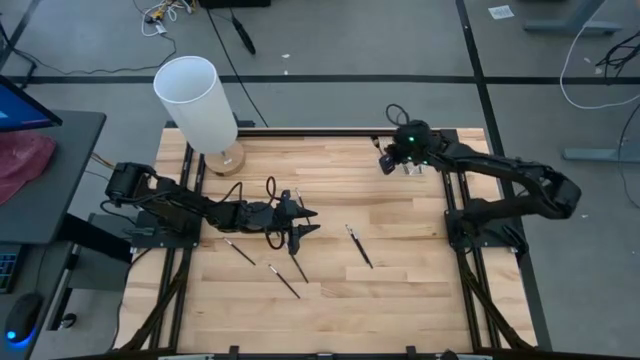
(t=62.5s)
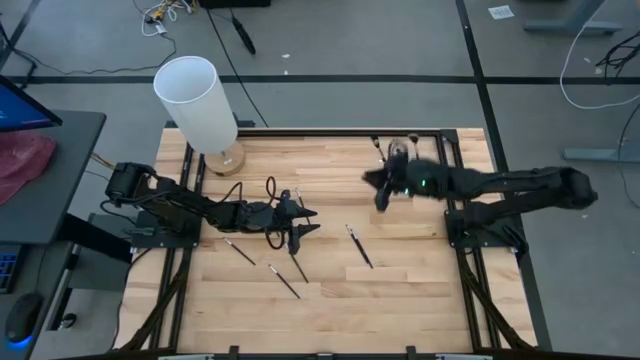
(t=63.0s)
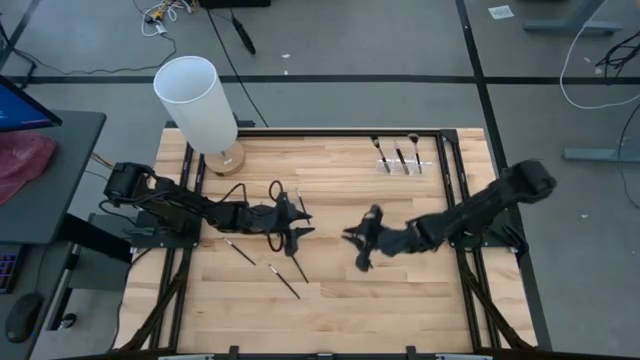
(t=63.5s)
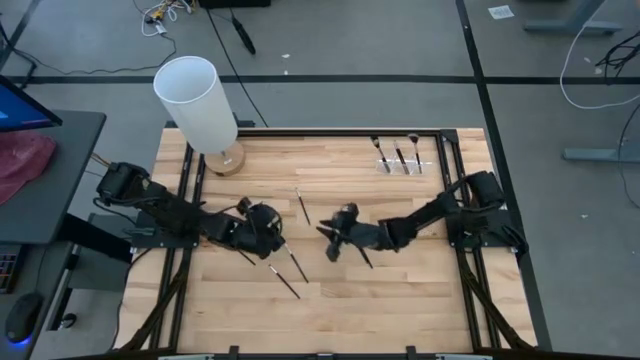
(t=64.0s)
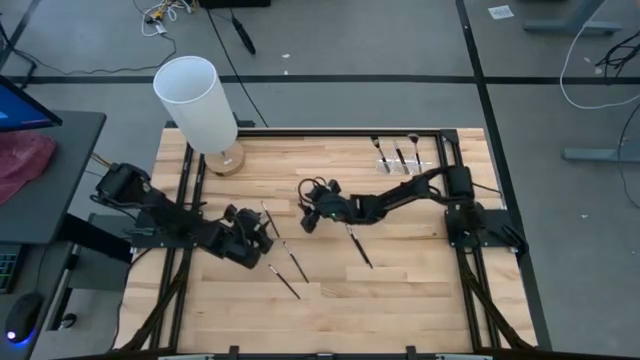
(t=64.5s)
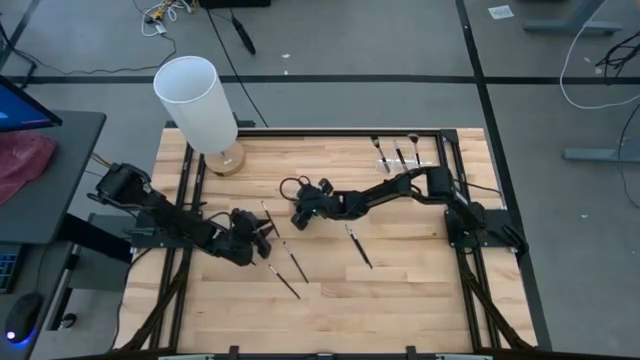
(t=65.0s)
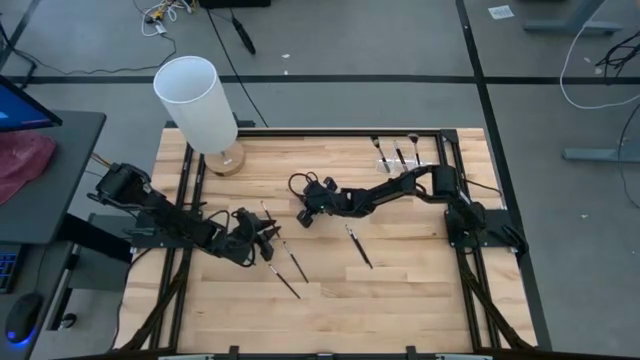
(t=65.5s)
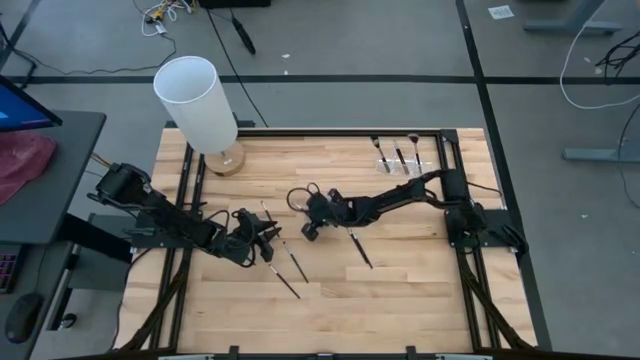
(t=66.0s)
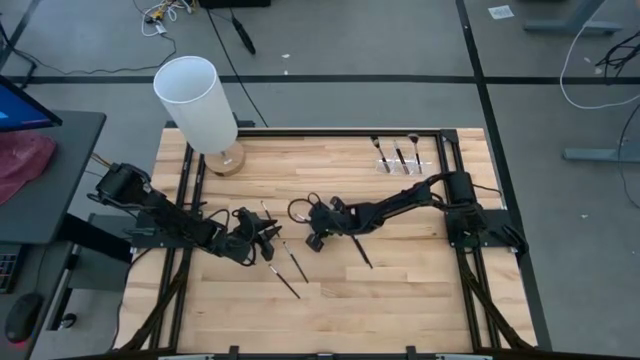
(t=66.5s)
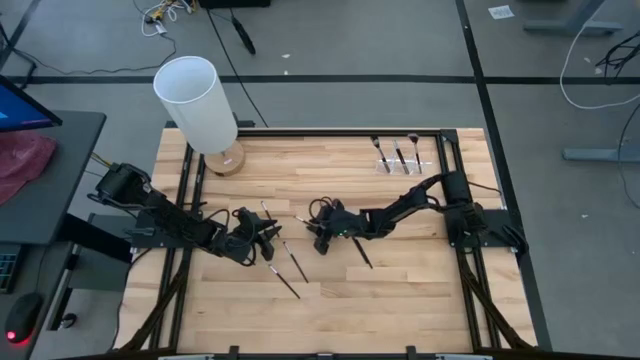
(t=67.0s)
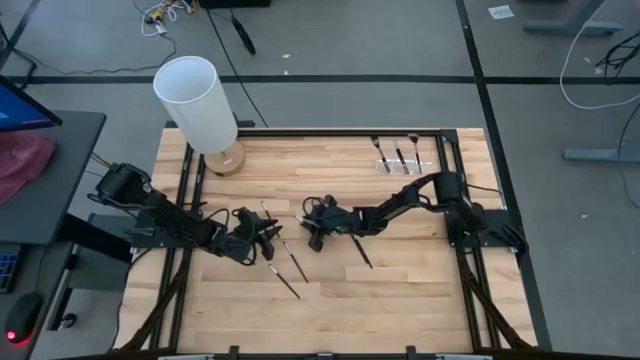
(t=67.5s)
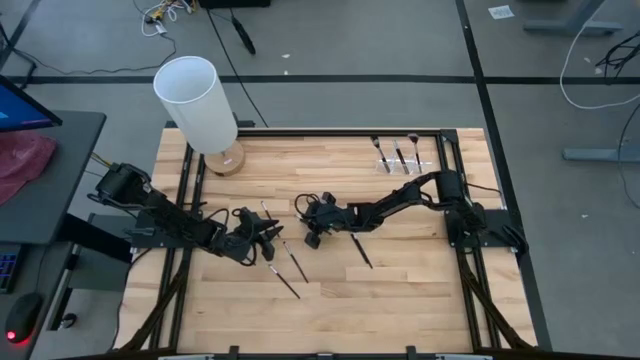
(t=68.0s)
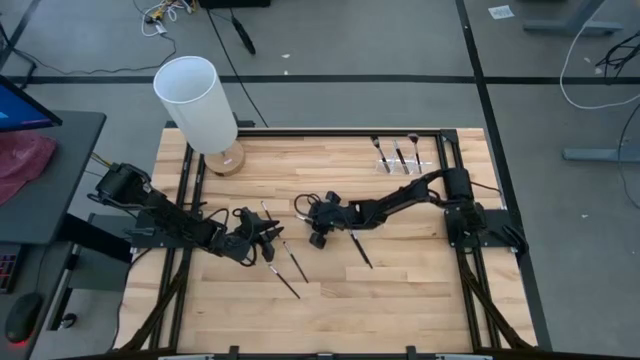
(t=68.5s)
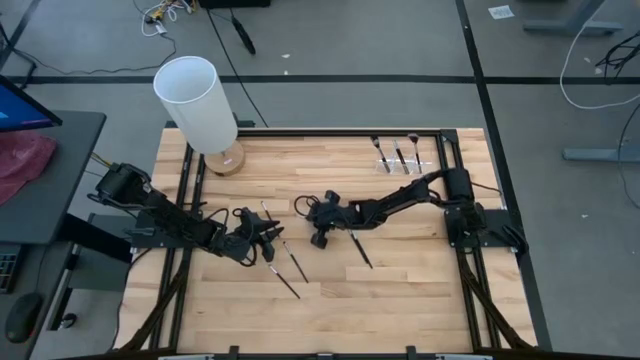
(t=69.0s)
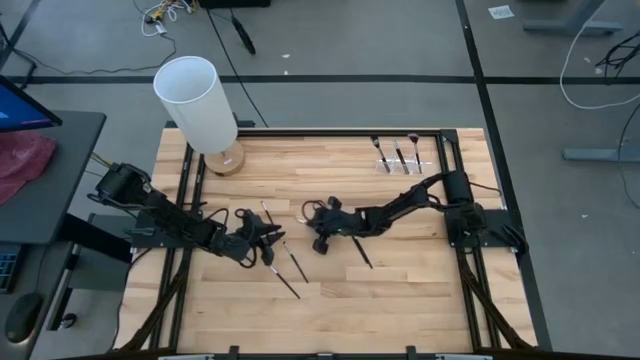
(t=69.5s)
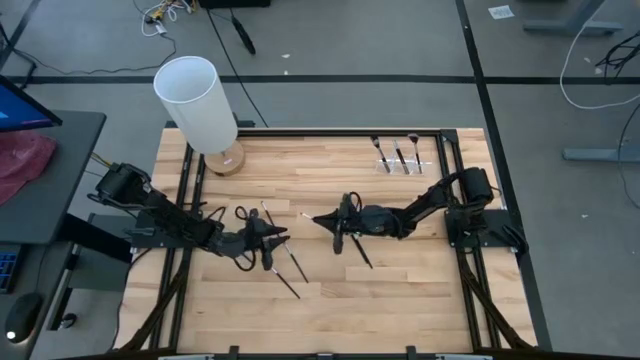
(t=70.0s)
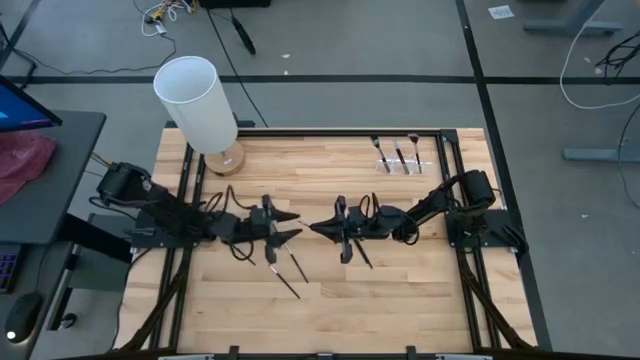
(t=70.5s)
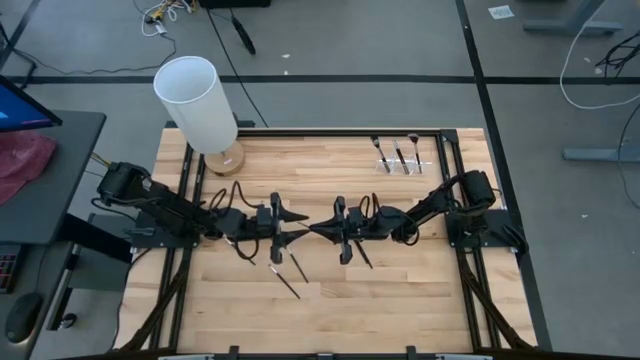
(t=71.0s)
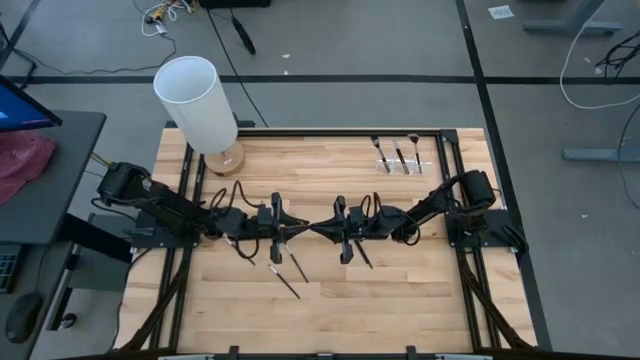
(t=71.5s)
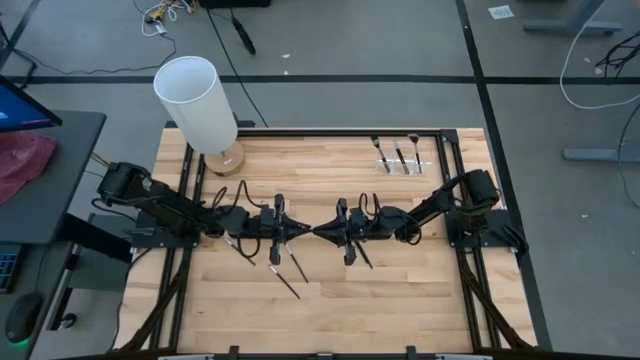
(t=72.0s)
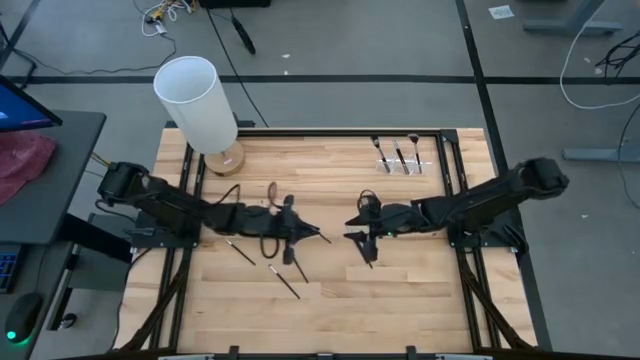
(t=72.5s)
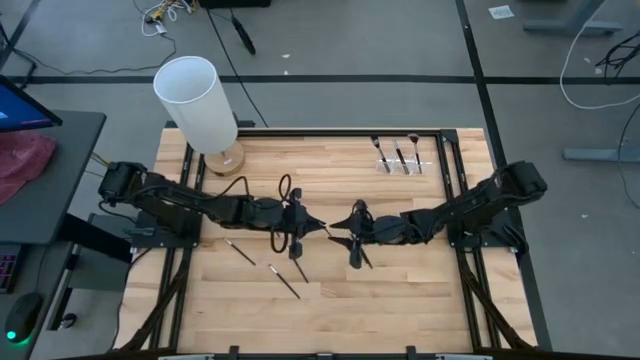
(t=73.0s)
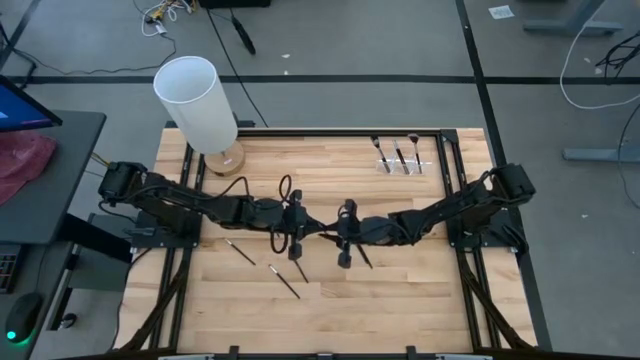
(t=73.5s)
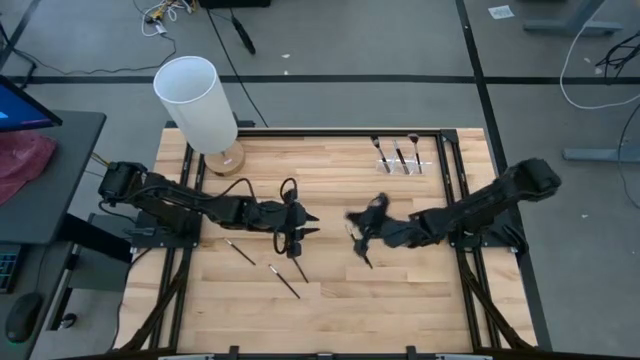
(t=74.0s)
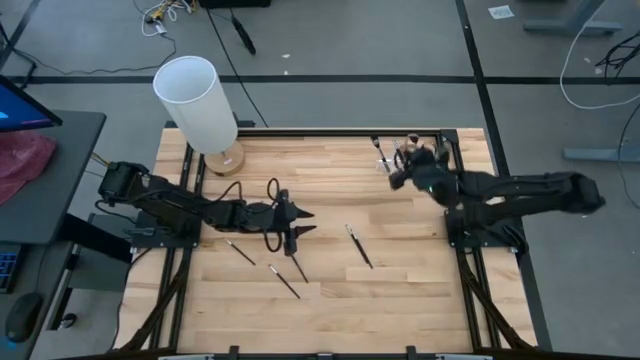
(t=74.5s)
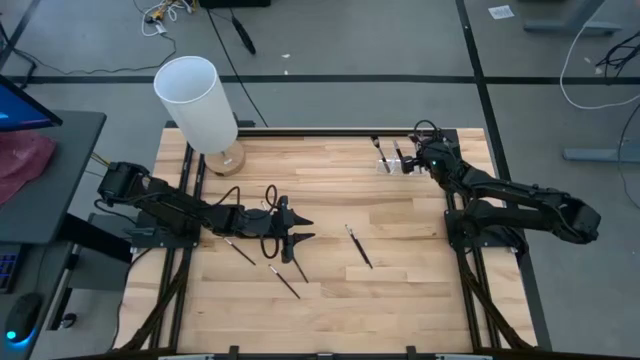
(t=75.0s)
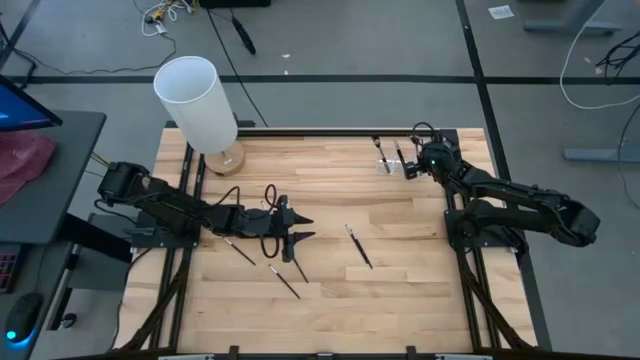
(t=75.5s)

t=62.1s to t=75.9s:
Task: Put items in baskets/containers
Put the eyeshadow brush into the transparent organizer

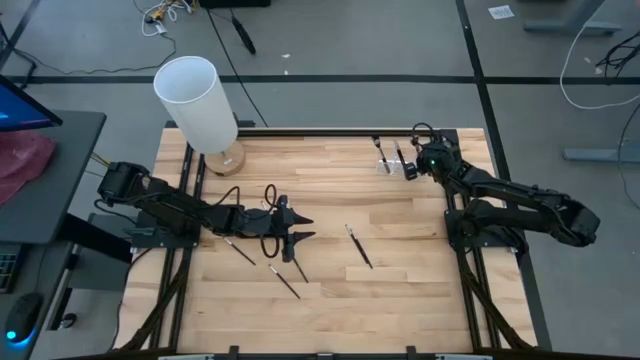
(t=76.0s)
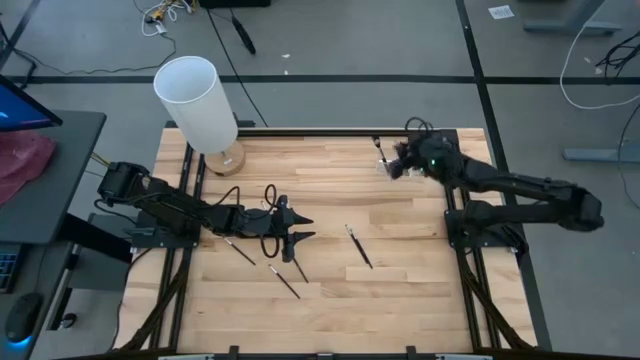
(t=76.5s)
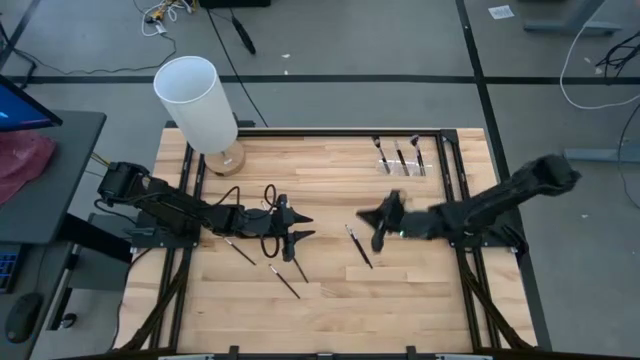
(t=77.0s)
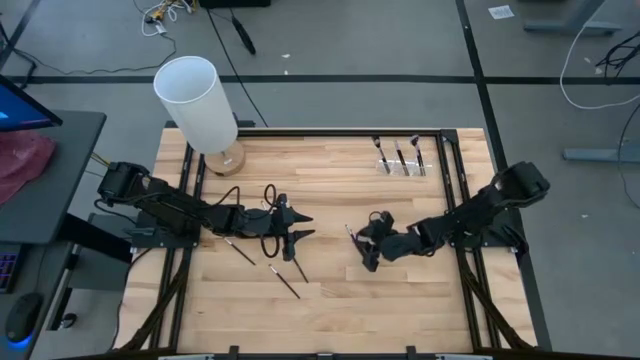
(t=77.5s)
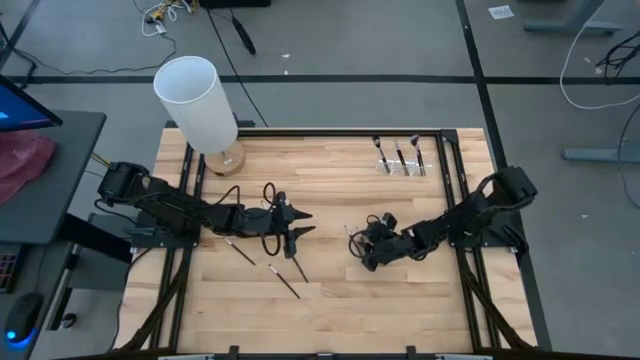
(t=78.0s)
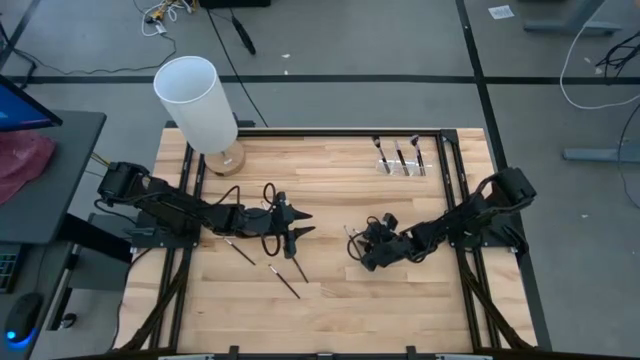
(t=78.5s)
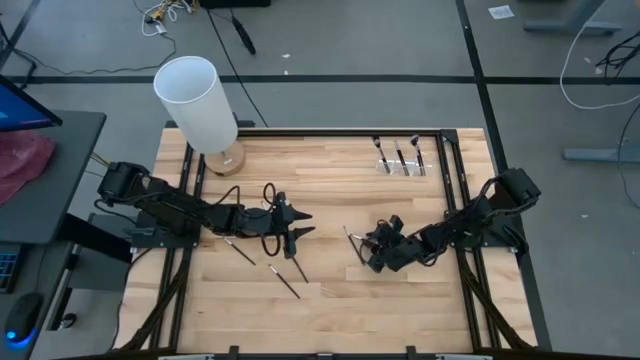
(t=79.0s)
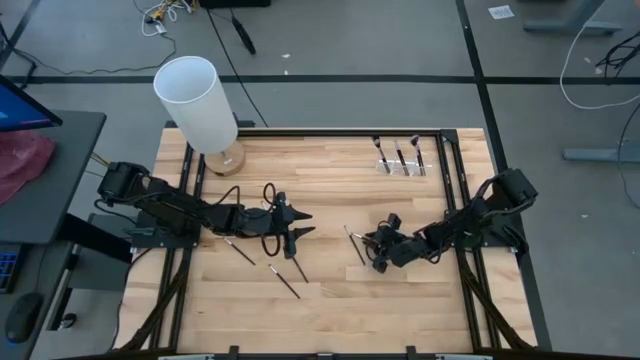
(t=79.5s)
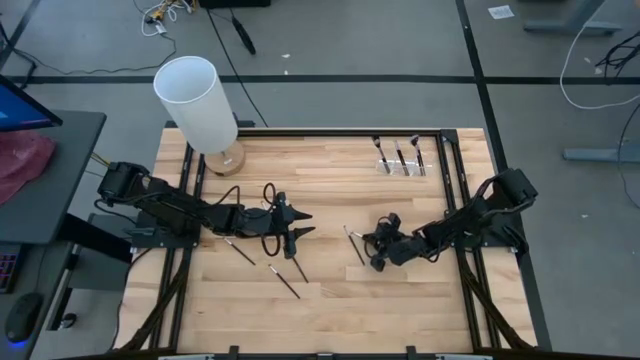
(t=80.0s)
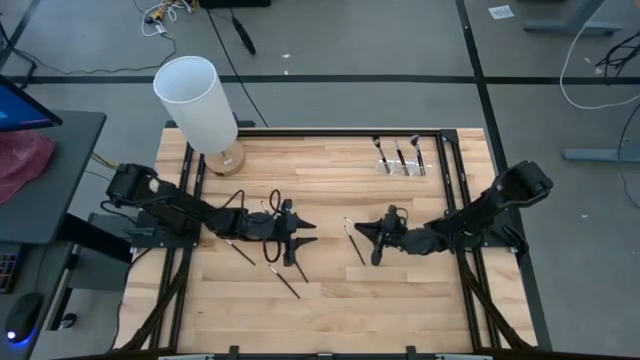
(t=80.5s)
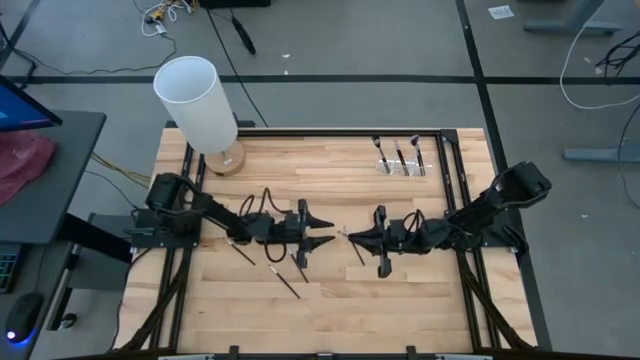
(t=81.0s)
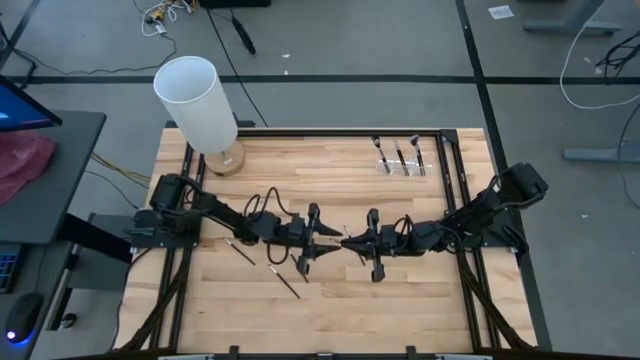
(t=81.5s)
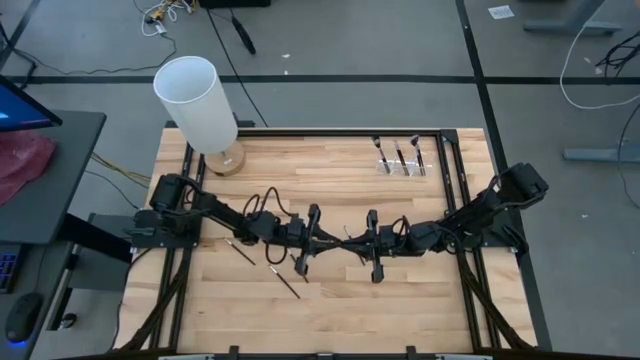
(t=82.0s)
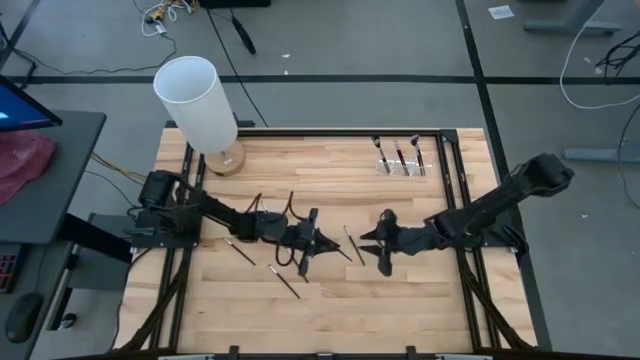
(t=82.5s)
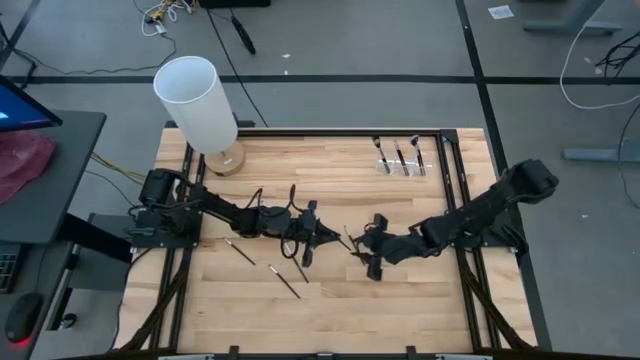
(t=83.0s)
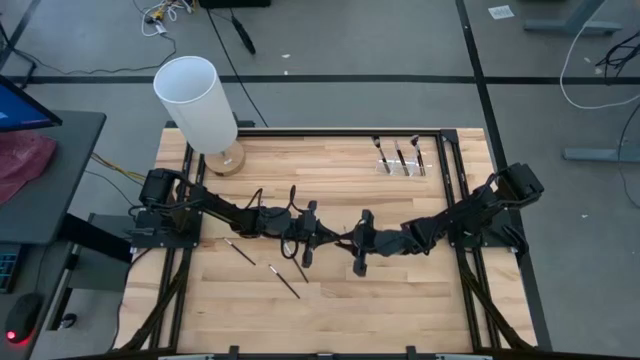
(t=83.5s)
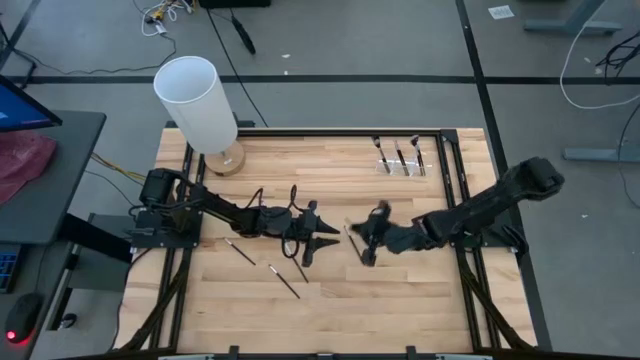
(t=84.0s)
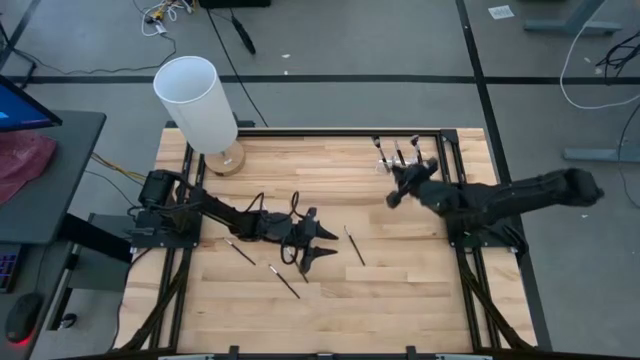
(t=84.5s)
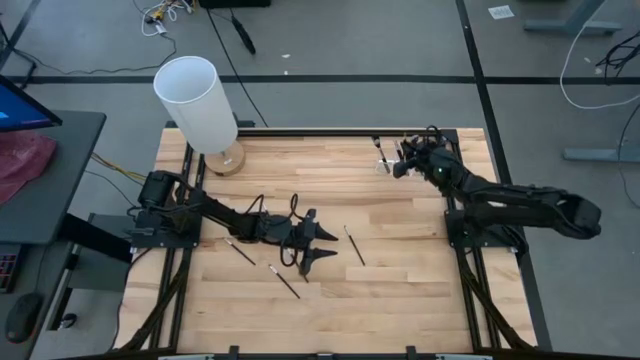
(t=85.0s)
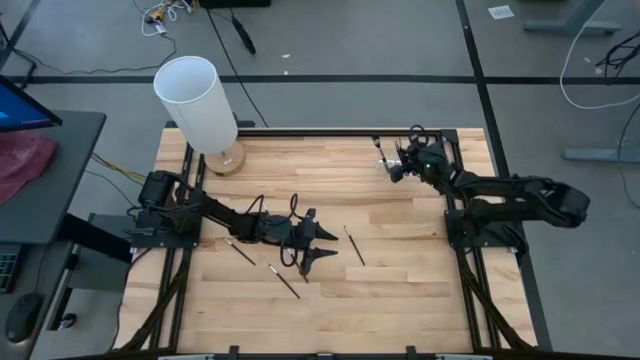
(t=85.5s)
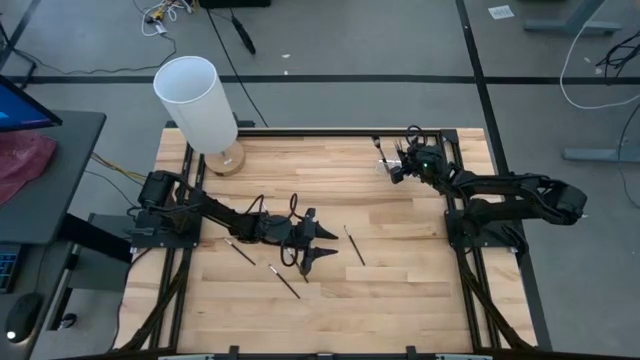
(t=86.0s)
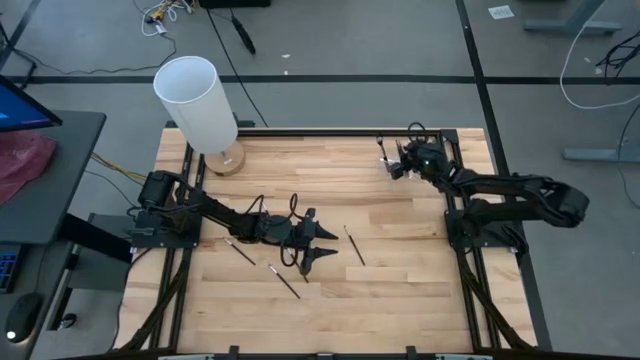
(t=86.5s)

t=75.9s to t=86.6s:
Put the eyeshadow brush into the transparent organizer
